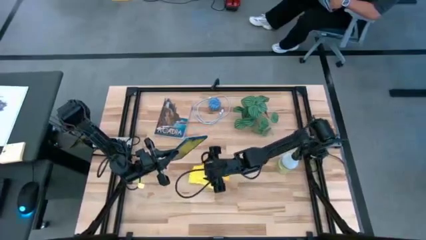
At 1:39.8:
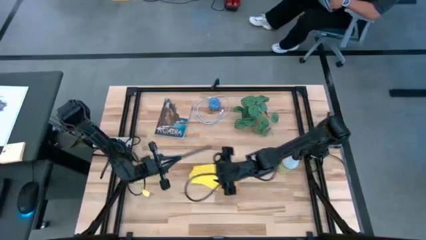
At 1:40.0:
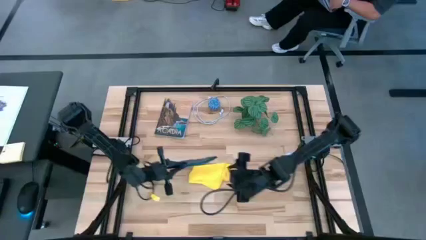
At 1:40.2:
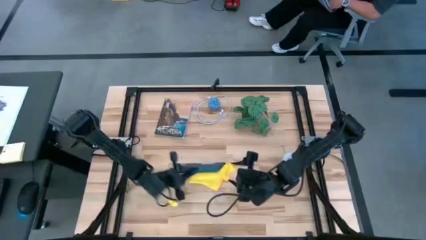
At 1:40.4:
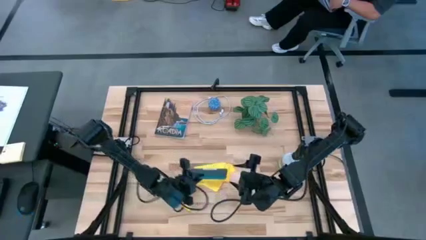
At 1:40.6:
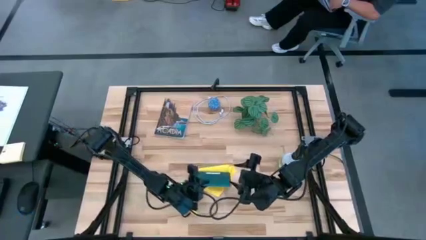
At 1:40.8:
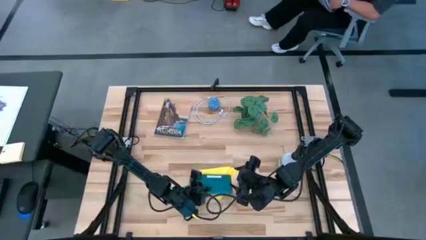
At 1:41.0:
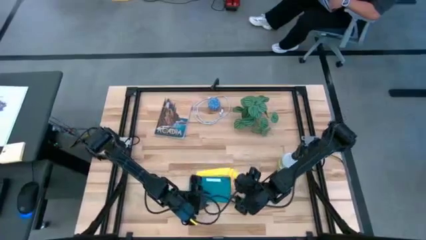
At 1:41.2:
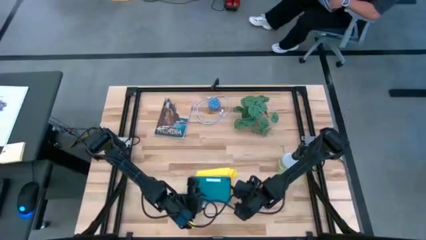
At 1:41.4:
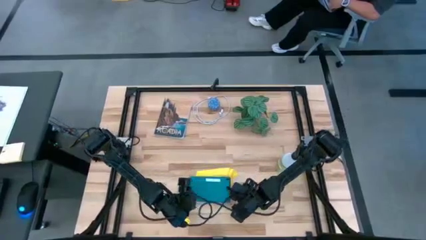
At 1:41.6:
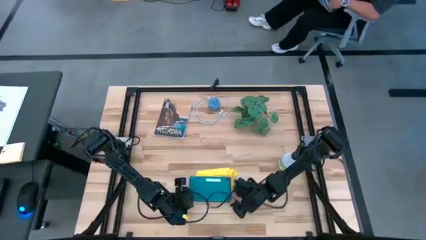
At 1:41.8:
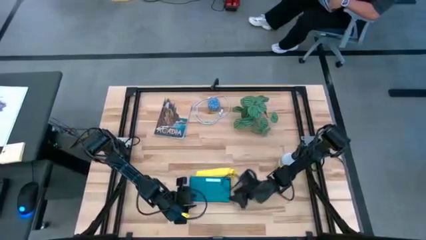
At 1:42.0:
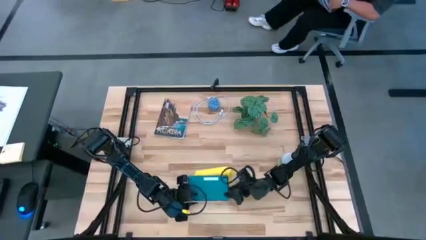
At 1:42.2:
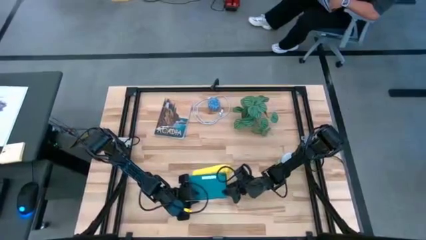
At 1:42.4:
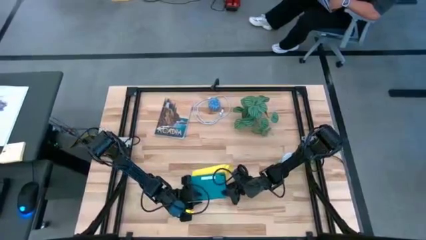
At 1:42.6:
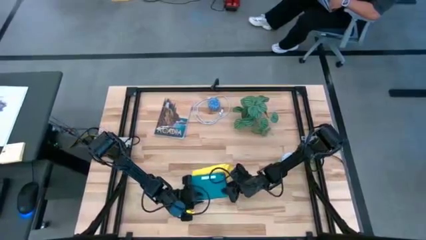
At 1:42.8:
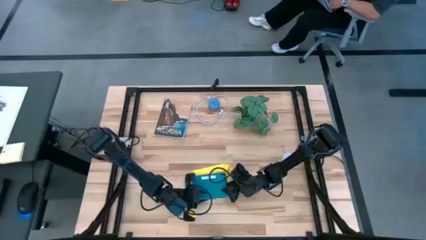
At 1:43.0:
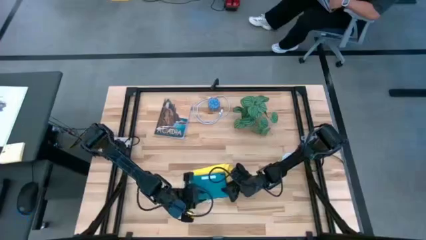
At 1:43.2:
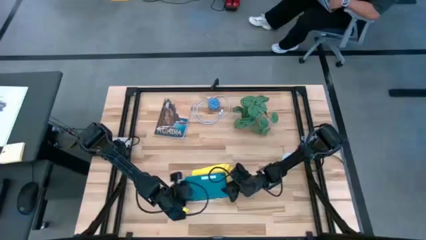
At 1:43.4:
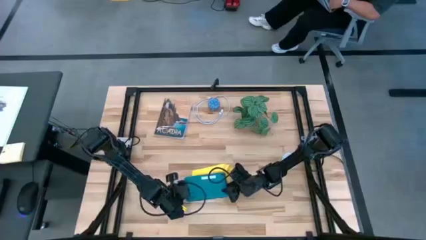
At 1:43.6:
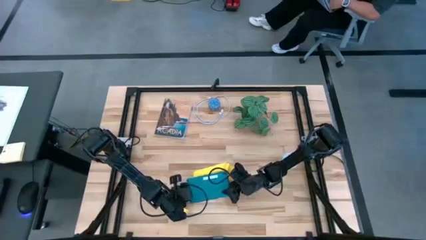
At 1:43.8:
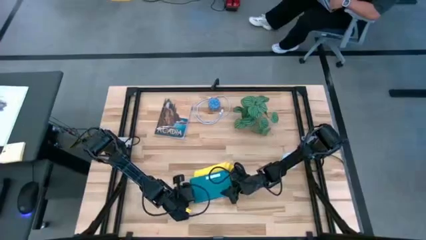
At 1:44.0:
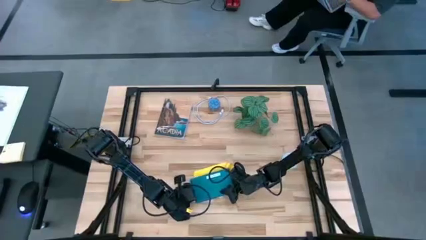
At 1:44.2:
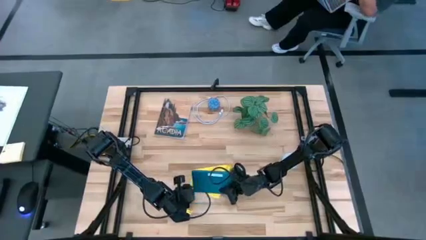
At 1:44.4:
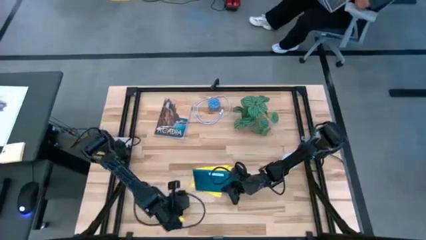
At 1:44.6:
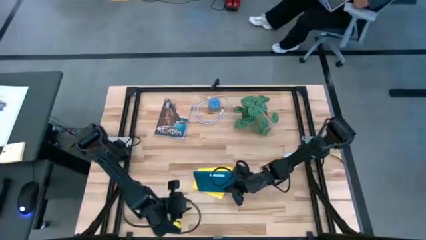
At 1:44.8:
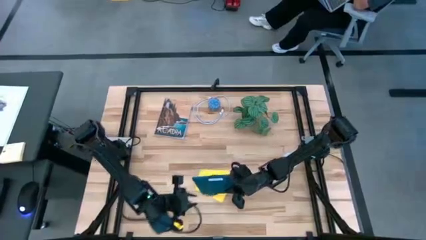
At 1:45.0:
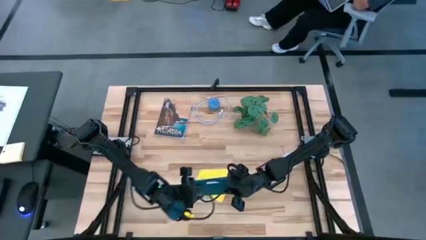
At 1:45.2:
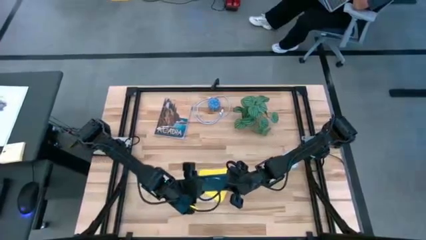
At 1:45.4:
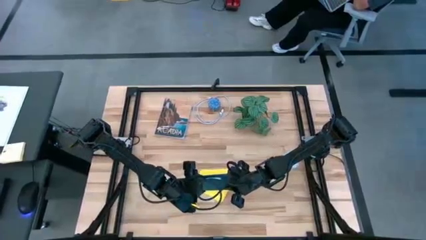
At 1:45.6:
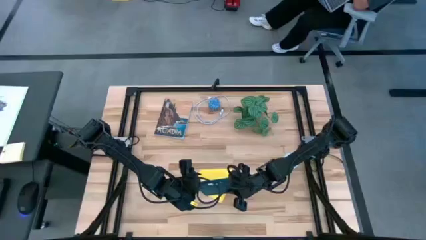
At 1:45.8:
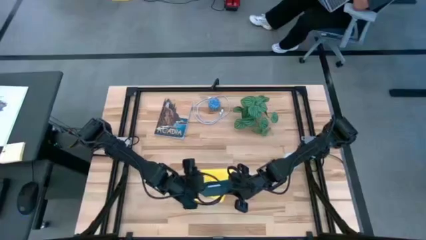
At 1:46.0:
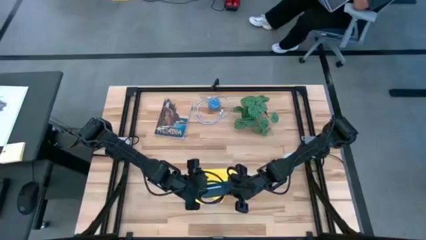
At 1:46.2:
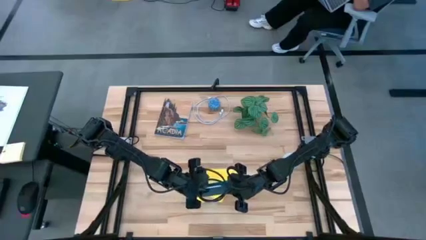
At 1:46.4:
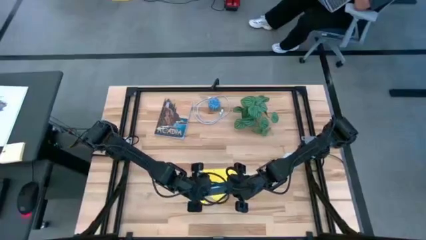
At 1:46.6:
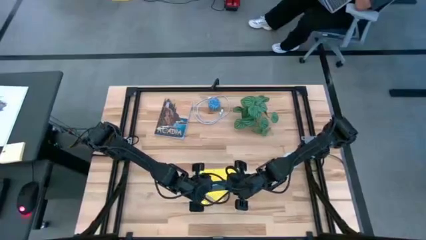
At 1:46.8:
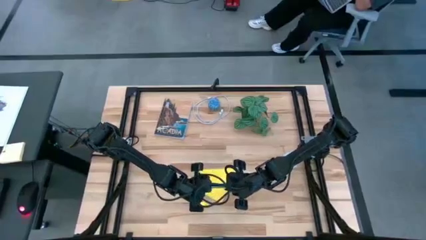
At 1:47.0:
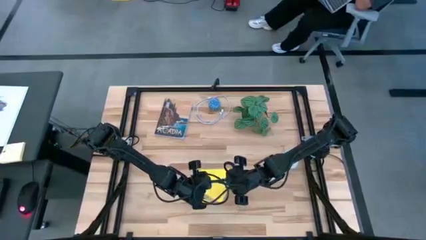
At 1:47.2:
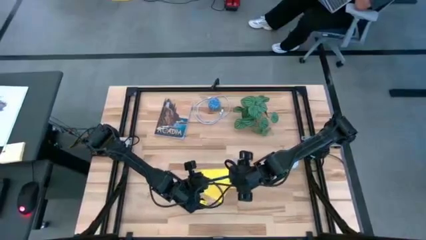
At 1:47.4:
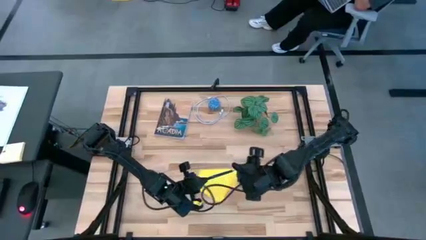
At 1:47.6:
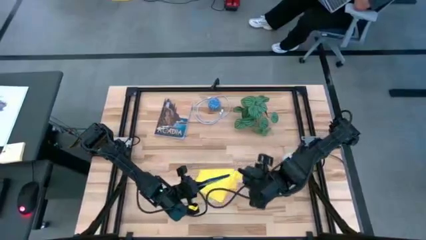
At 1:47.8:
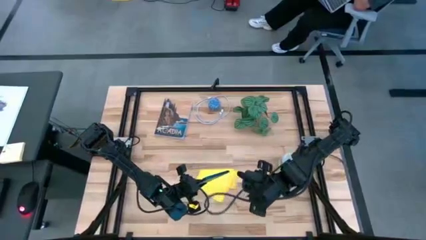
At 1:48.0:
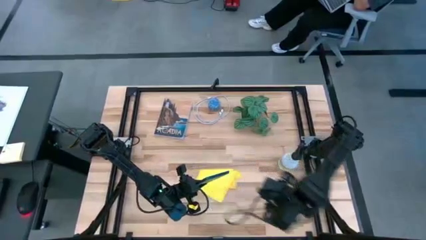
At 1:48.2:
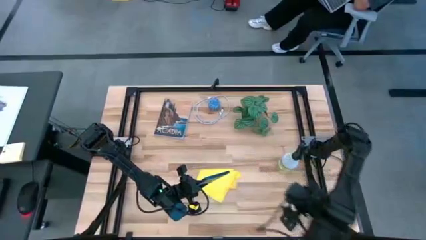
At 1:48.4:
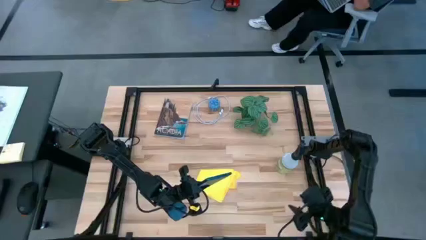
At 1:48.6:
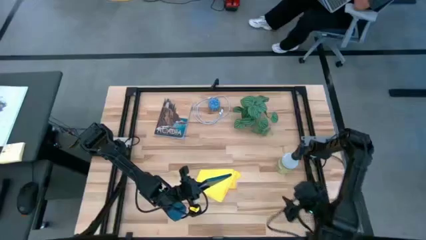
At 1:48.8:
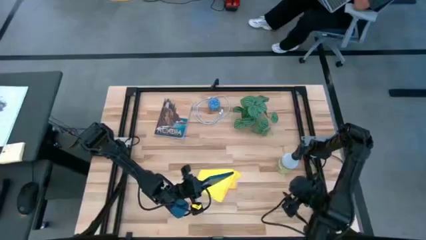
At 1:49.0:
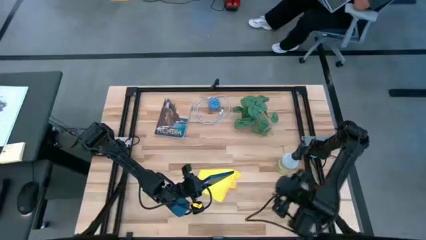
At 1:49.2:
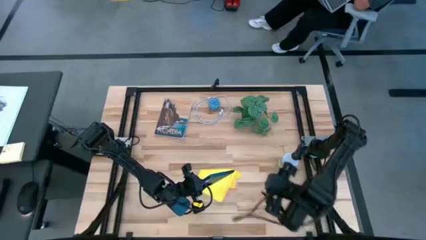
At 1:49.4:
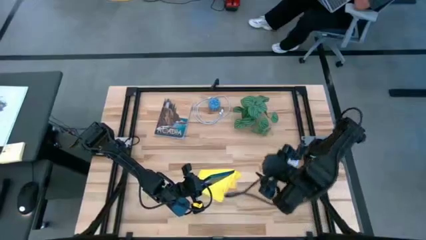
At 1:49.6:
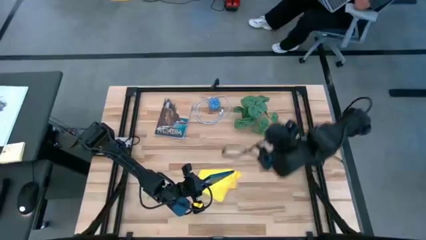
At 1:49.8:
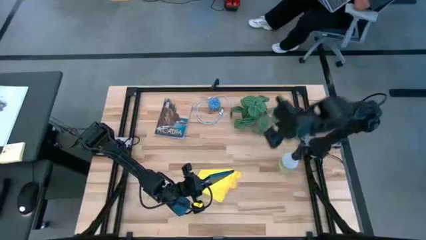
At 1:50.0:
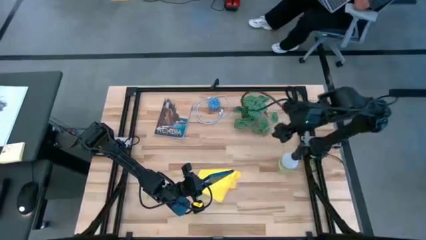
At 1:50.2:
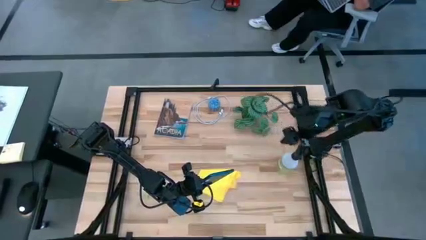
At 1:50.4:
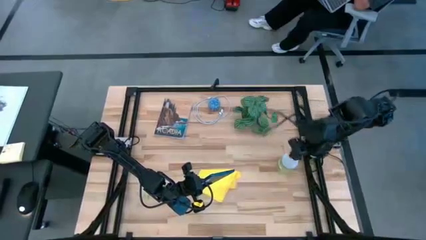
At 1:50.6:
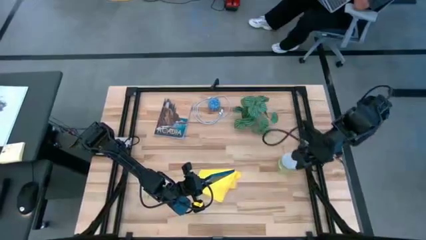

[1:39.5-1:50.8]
Task: Clean tablet
Spray the back of the tablet using the cleaning bottle
